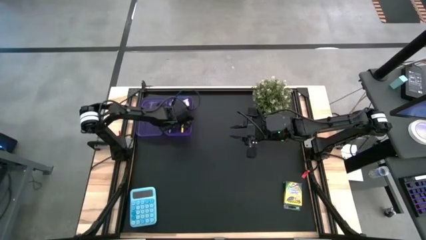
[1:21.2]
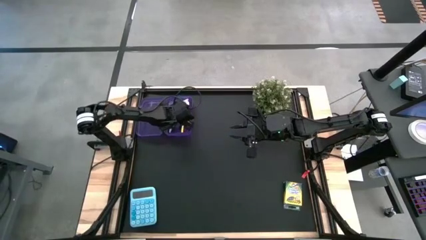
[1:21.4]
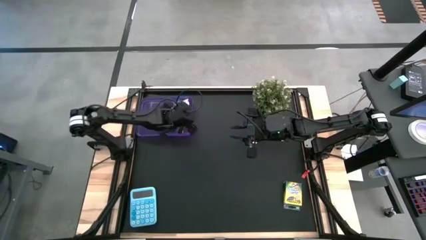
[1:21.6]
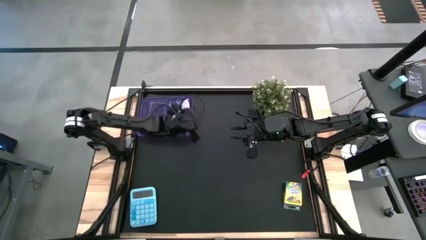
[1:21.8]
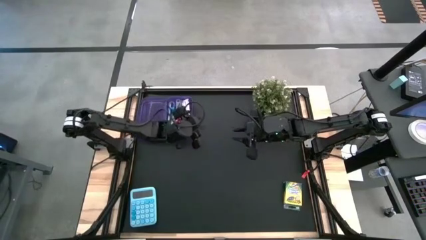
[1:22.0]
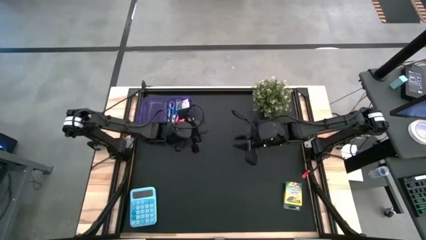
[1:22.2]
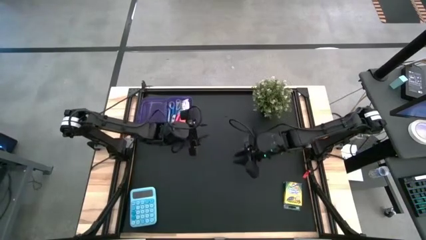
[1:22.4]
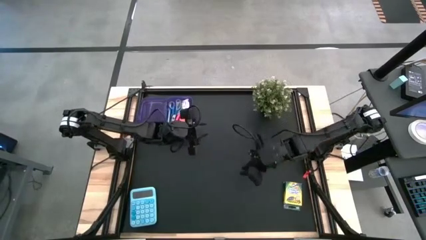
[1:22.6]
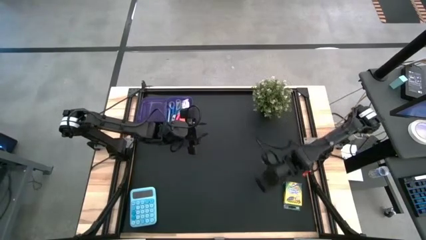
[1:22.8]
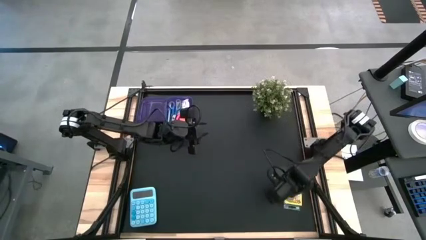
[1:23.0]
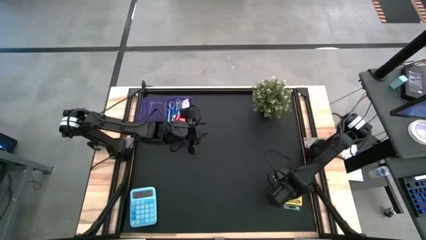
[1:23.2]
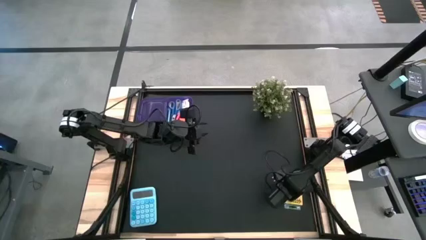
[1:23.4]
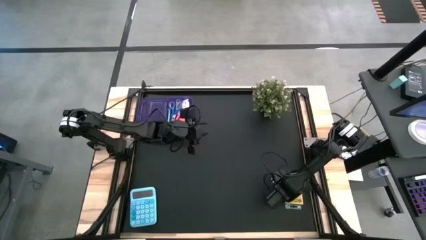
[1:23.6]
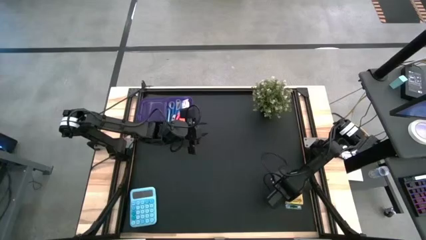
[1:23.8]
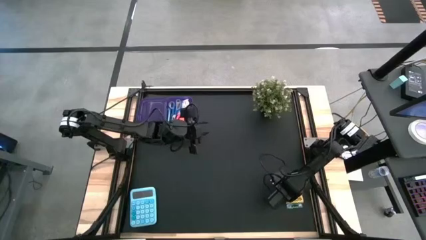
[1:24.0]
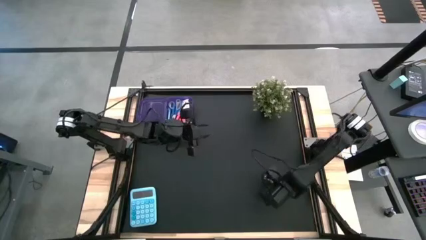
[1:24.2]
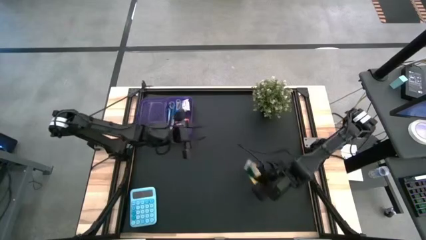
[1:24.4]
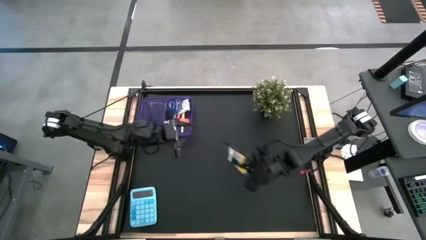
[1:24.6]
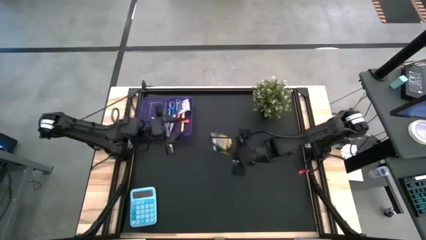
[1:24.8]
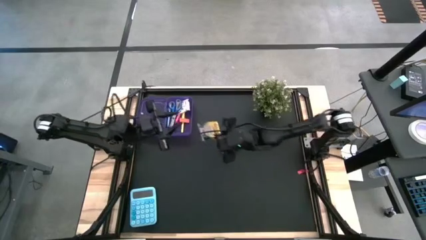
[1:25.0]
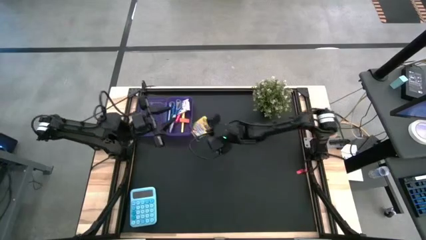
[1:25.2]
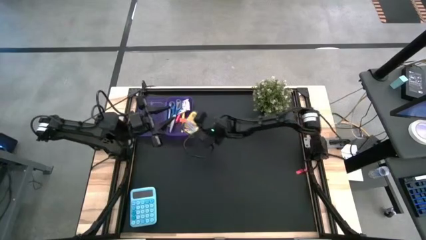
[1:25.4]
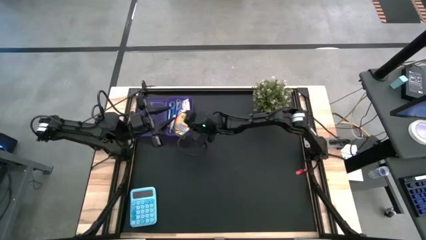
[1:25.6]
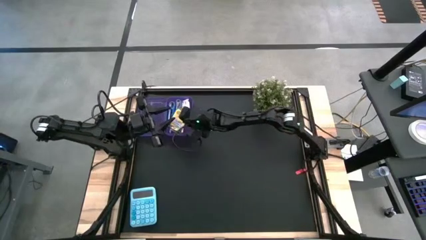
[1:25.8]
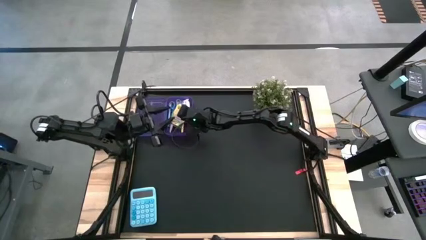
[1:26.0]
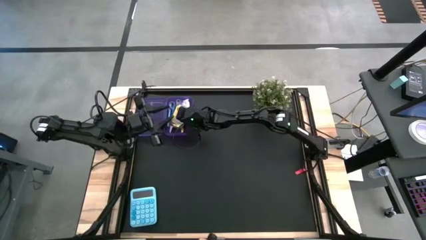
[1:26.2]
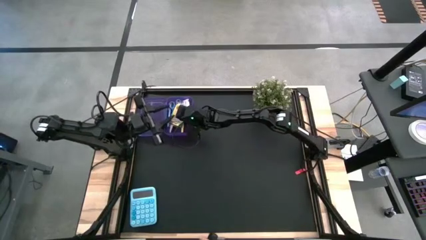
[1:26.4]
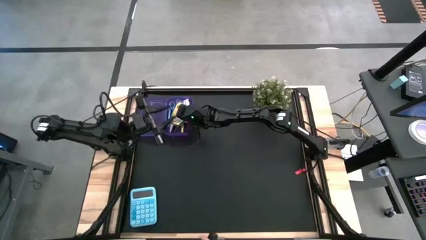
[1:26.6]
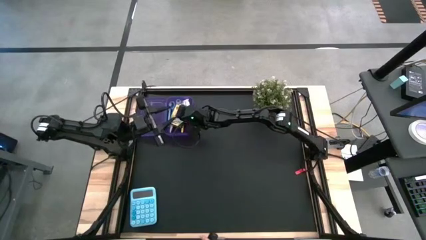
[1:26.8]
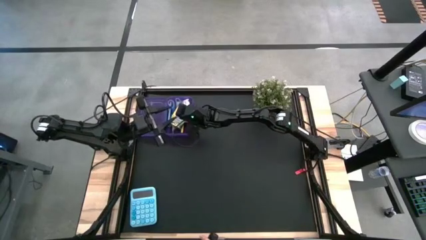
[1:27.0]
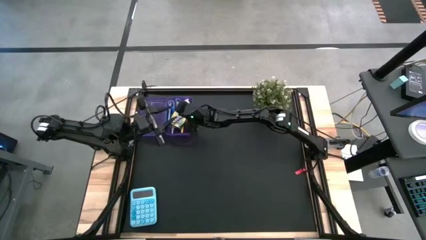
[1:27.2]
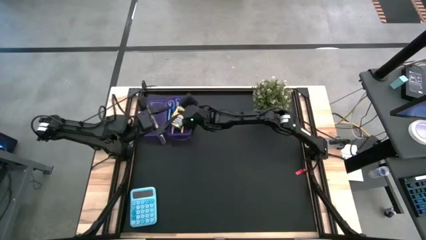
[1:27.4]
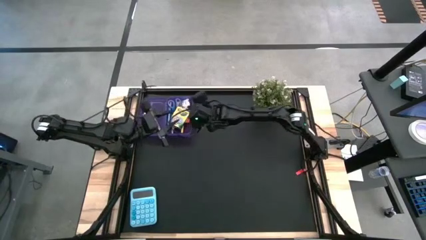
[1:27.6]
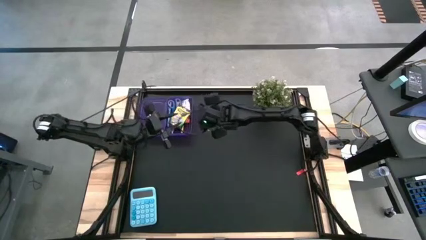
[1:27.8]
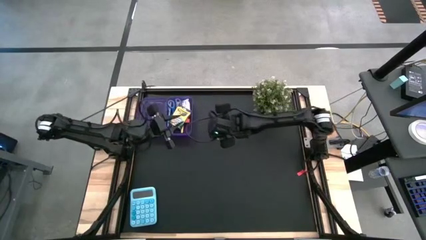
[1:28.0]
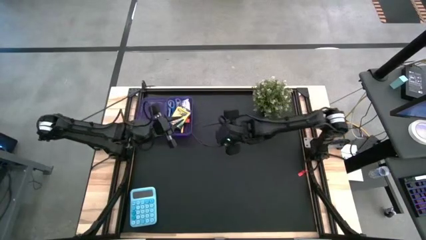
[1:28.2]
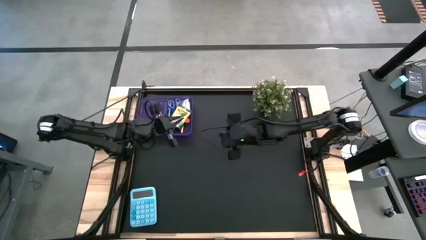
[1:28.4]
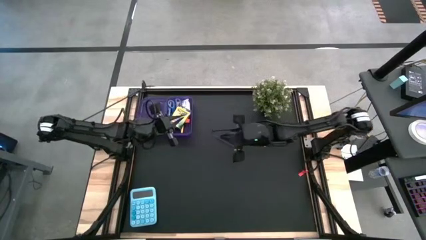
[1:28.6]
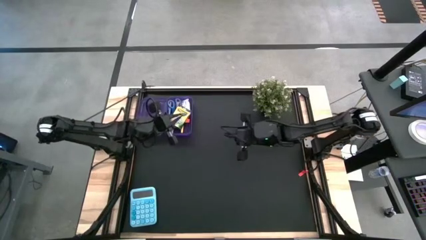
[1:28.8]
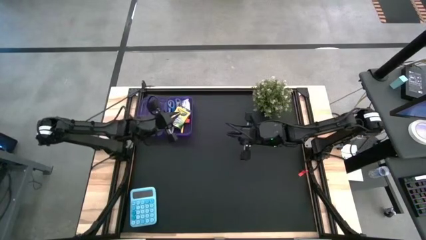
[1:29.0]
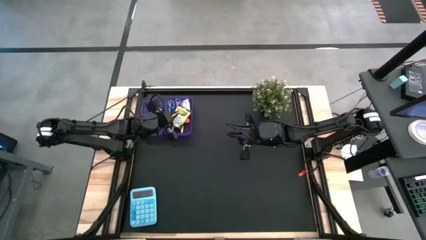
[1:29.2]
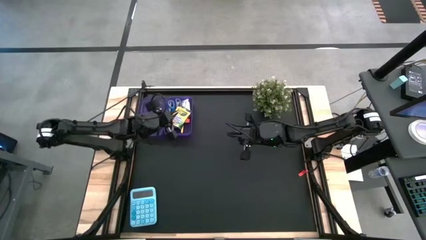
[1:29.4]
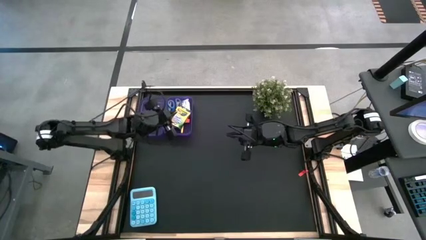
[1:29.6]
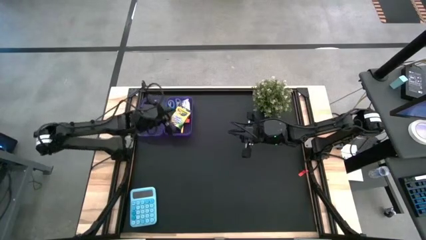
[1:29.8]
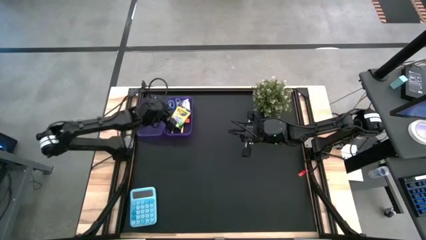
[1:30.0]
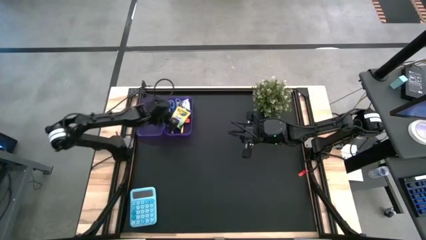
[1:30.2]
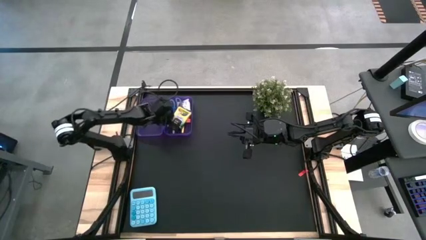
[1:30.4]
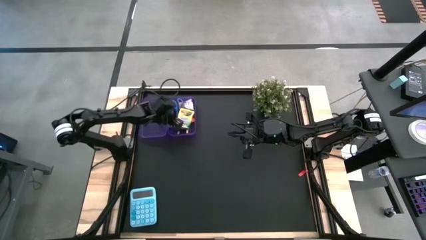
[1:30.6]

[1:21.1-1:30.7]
Task: Pack school essentials
Put the yellow box into the purple box

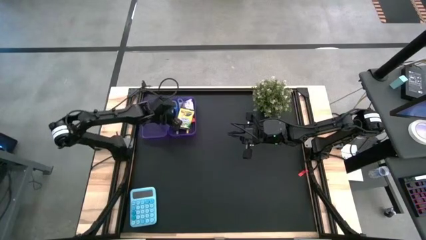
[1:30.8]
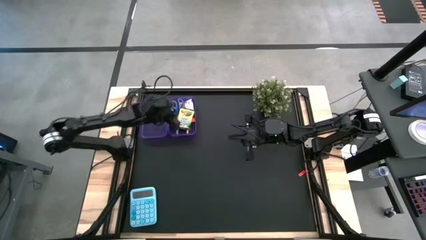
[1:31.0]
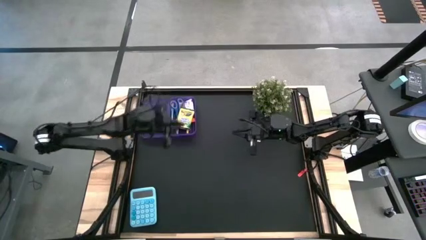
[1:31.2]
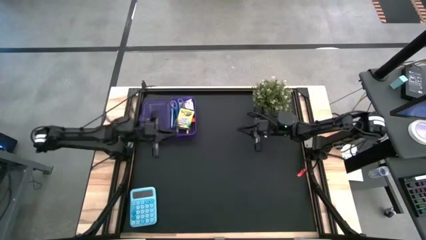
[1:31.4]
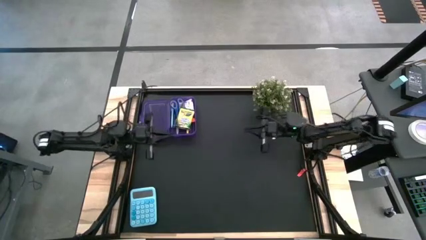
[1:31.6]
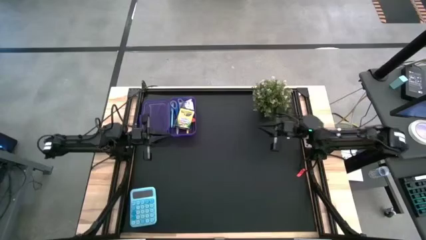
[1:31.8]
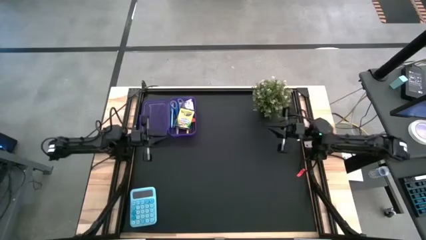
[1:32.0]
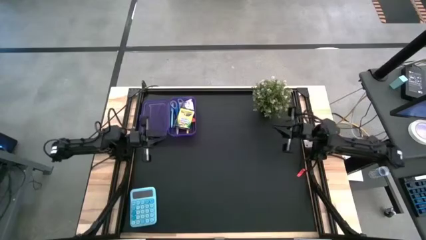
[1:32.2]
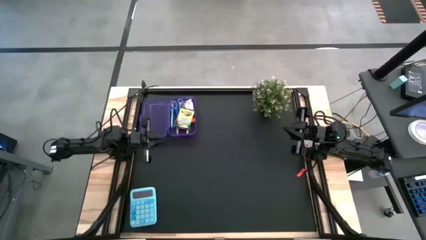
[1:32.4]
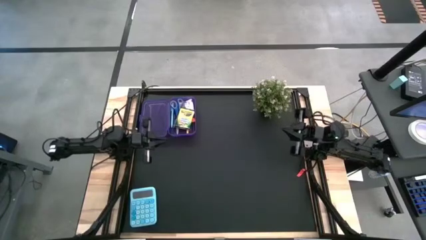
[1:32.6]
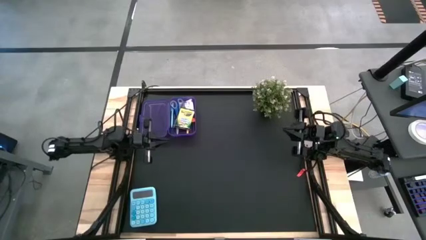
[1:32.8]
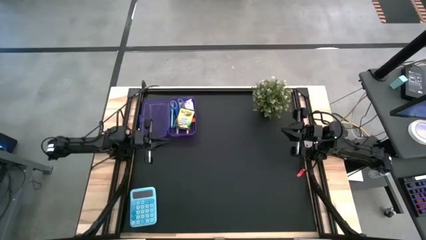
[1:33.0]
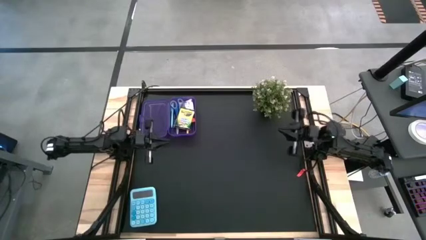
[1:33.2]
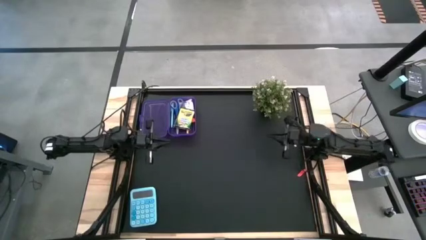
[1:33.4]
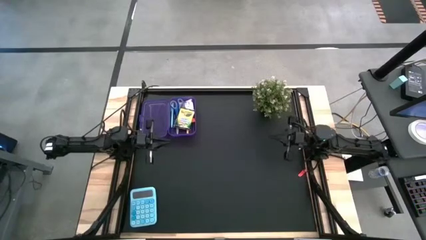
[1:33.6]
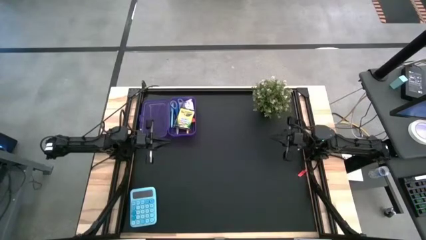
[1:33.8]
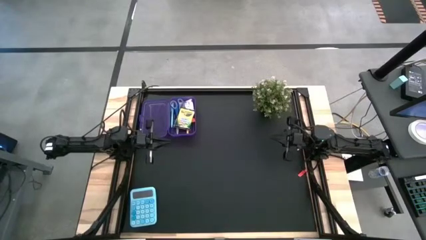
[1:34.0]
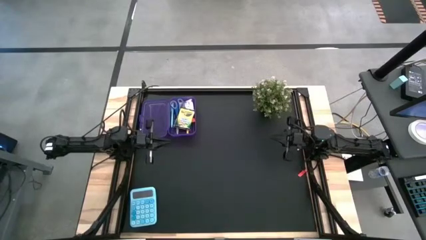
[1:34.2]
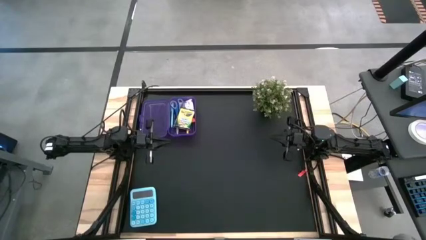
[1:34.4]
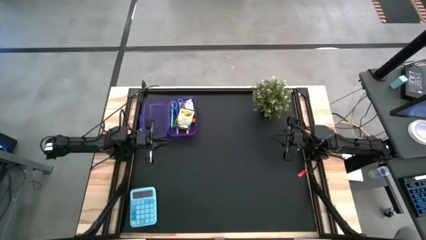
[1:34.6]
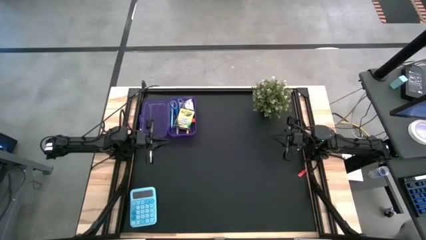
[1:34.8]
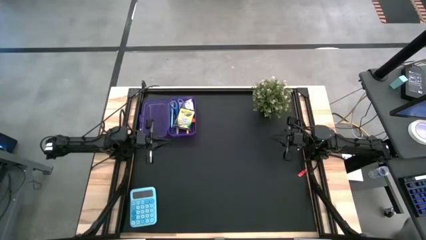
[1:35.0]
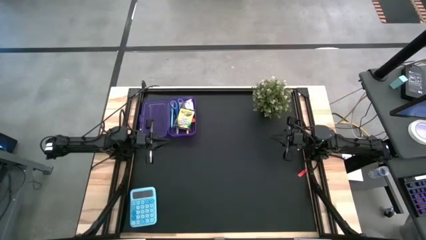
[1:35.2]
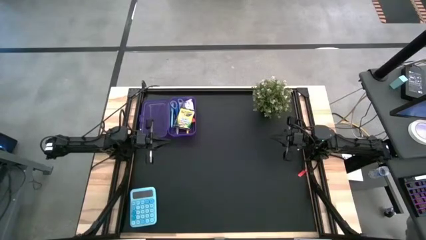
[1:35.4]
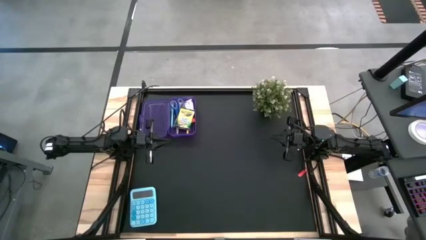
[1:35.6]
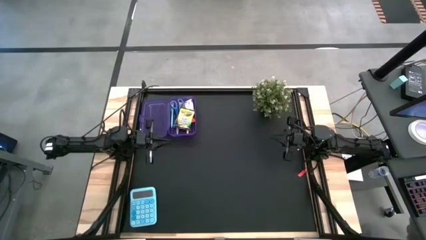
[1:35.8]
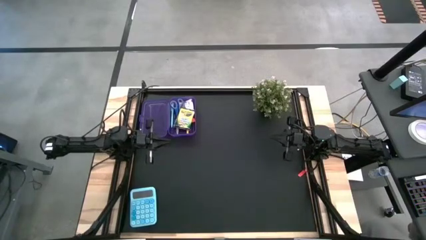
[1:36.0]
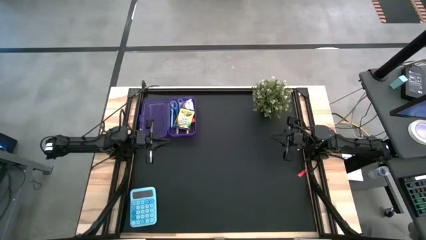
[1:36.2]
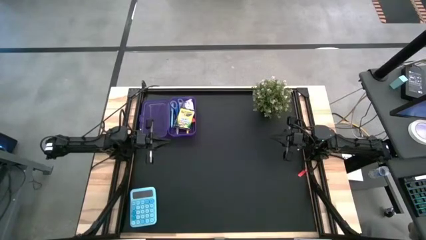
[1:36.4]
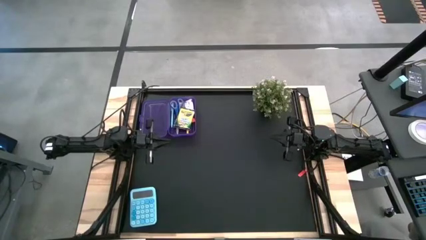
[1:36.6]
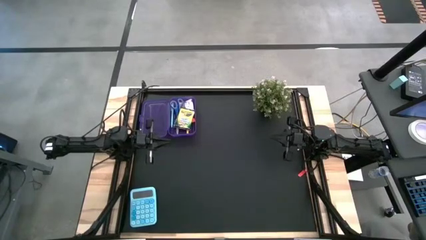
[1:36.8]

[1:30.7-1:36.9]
Return to Home Position
